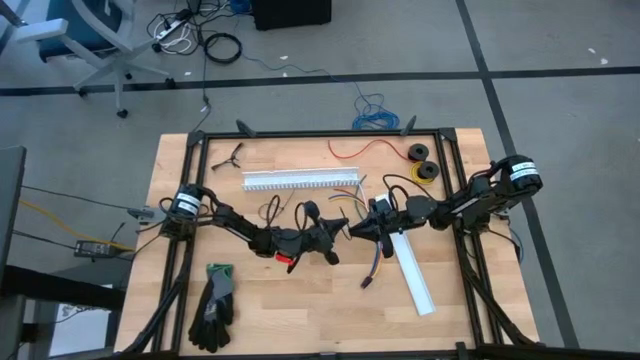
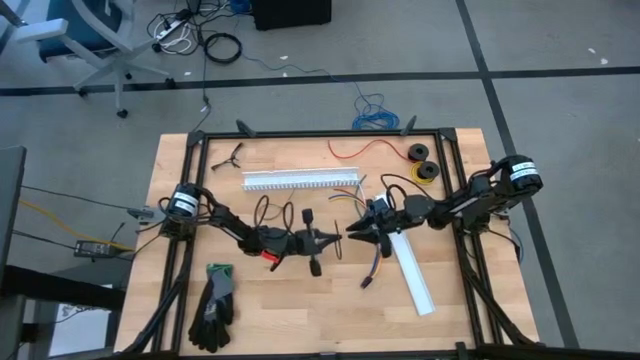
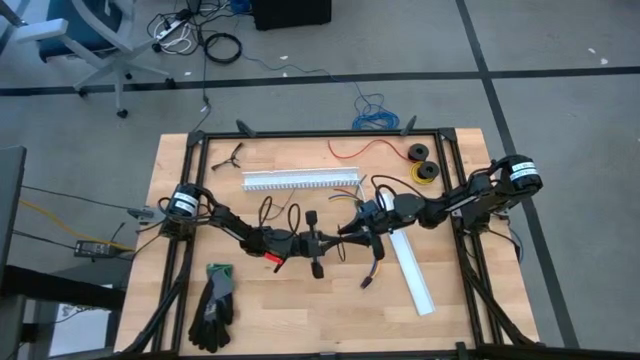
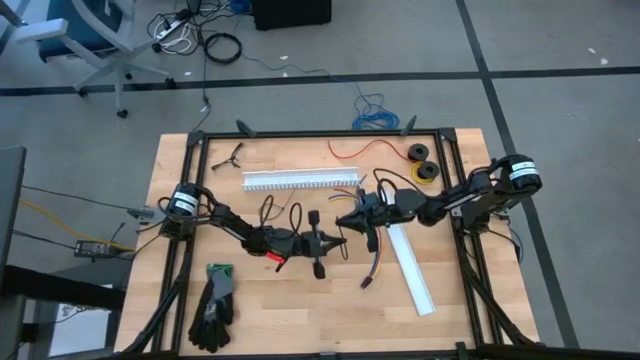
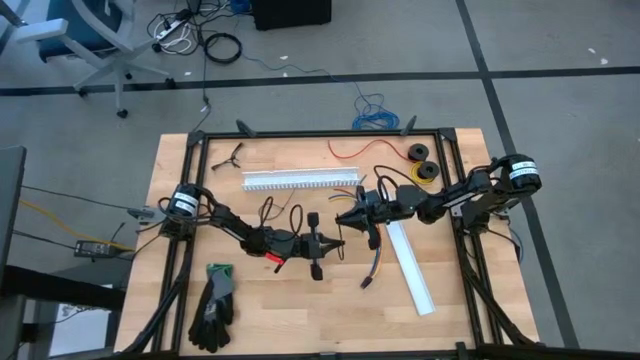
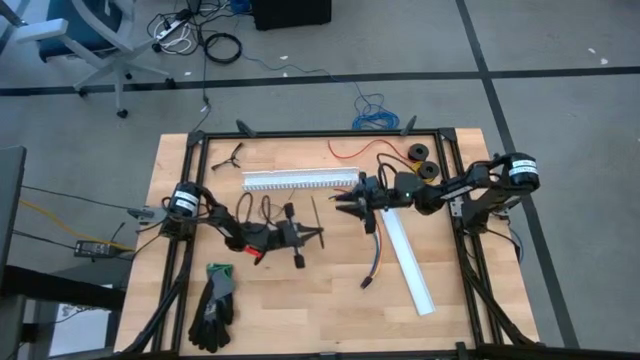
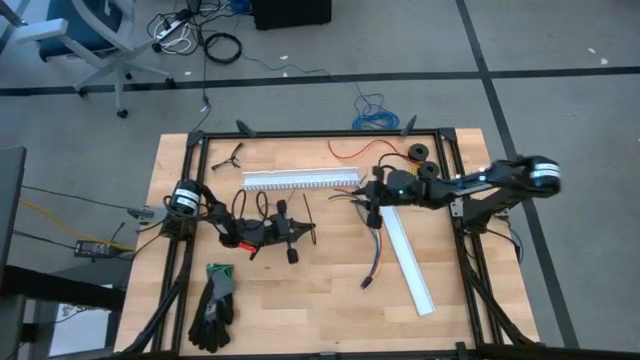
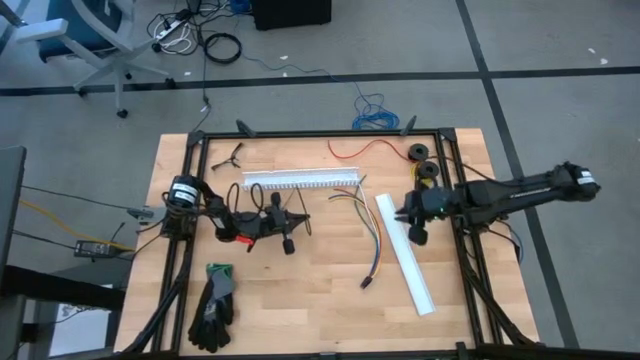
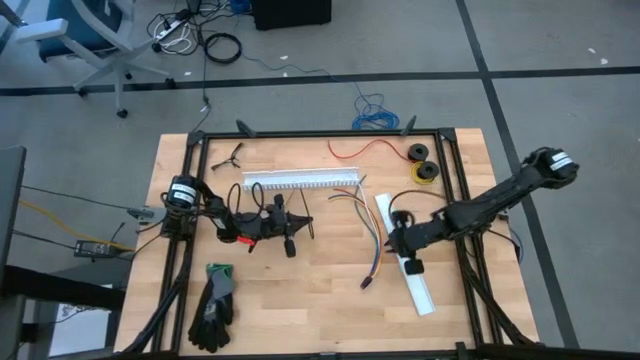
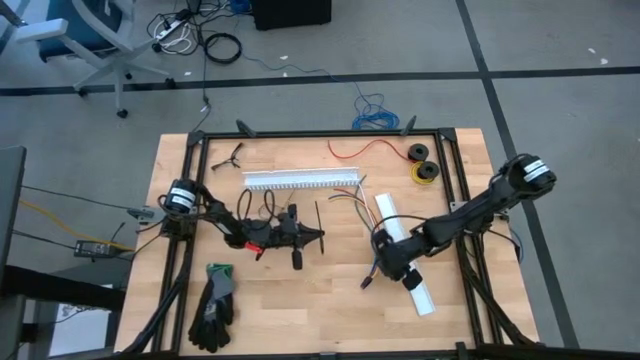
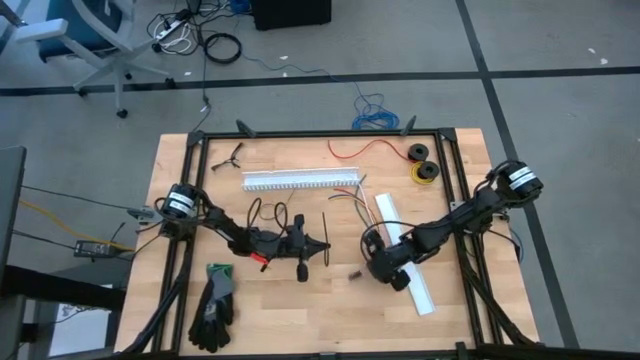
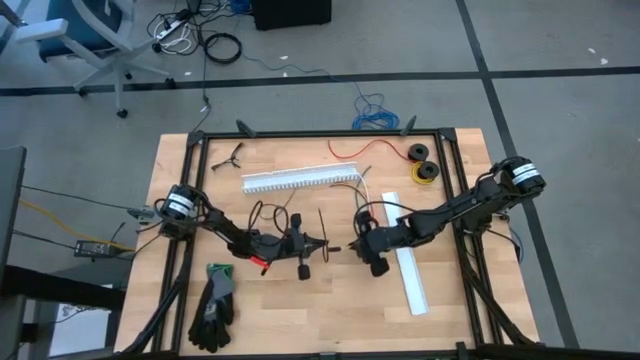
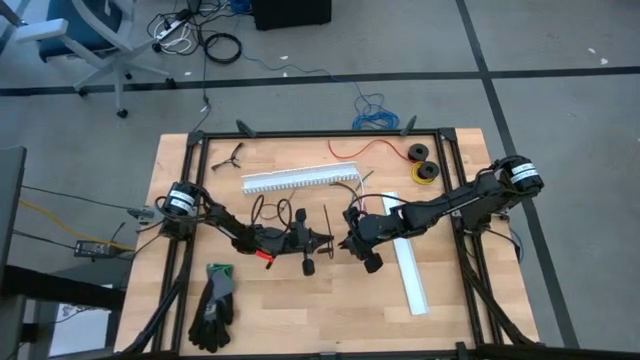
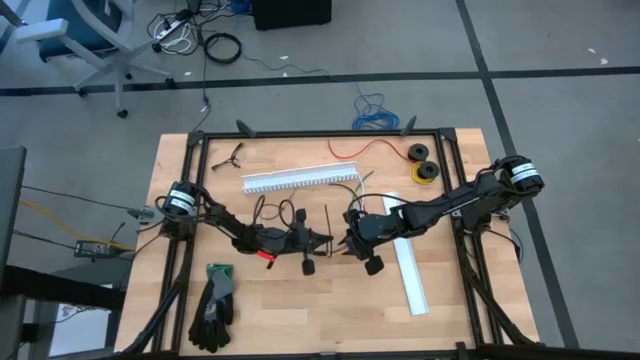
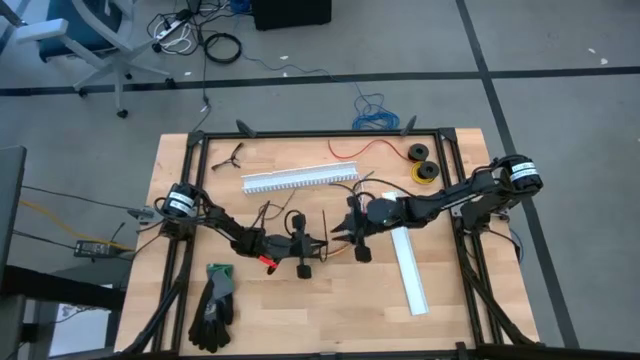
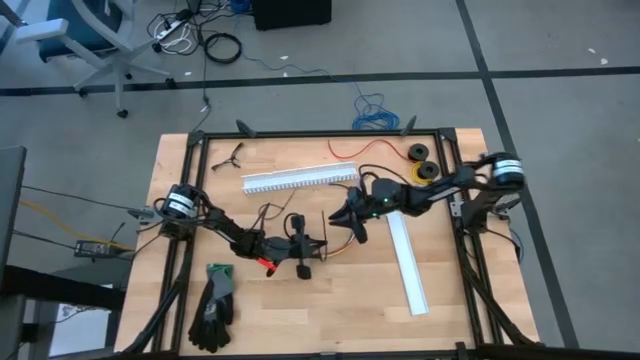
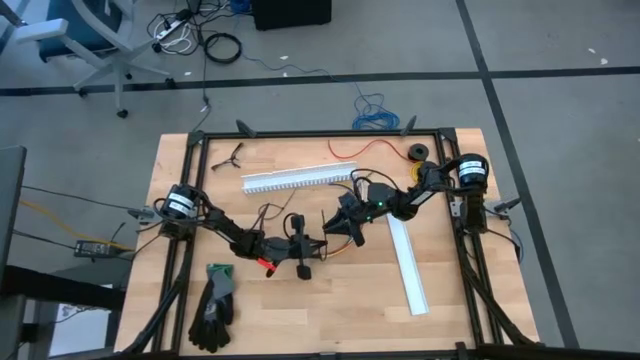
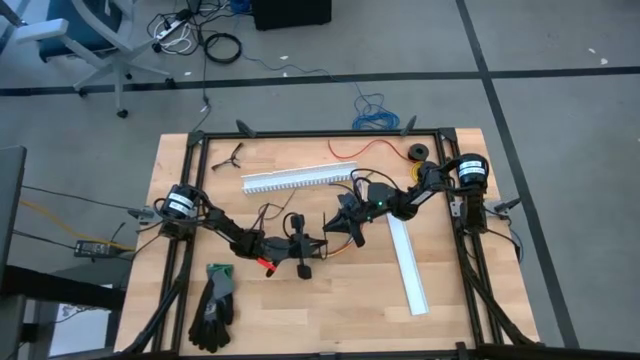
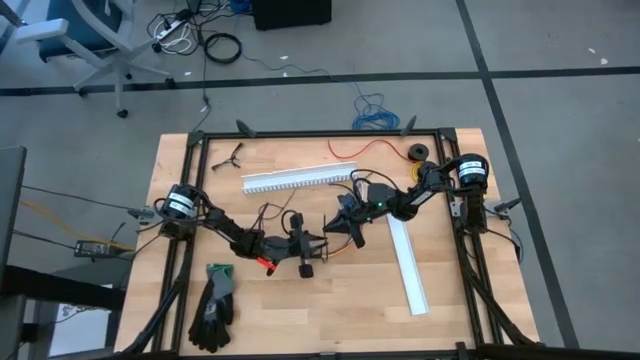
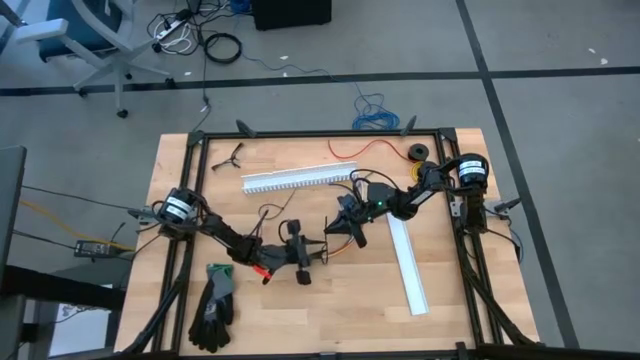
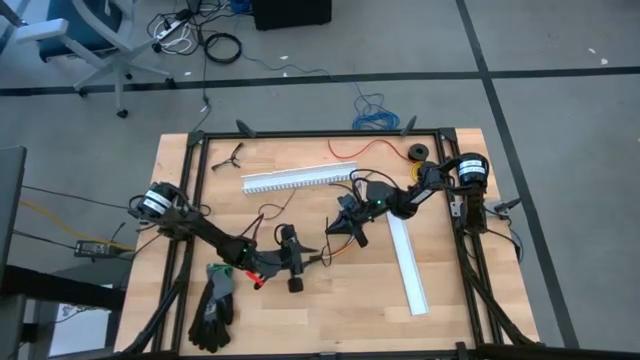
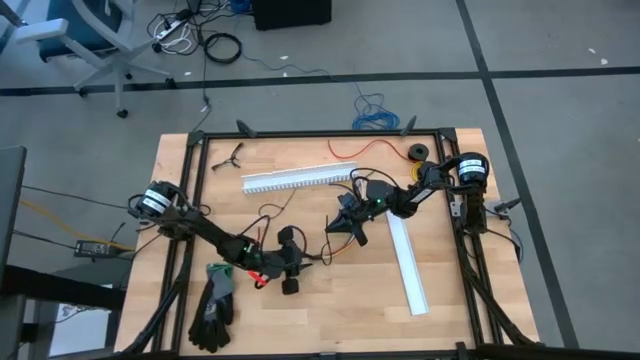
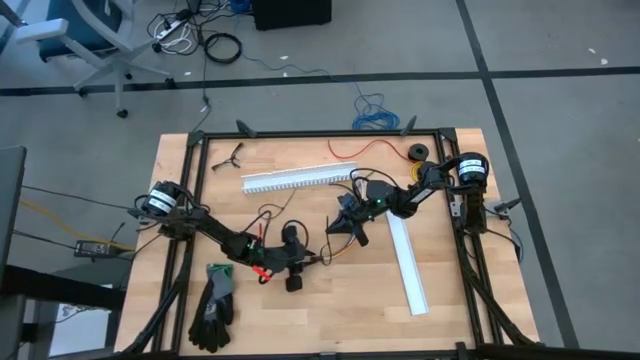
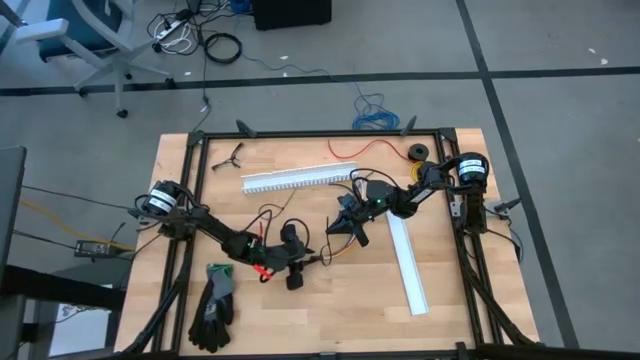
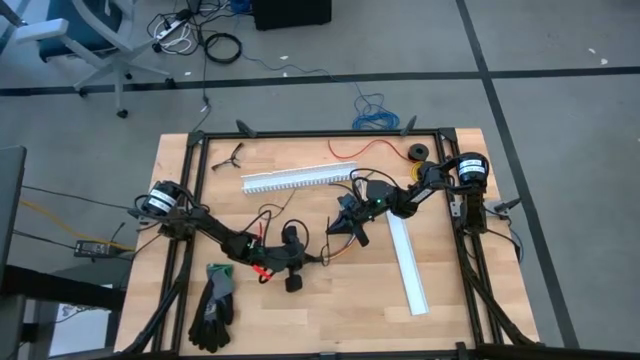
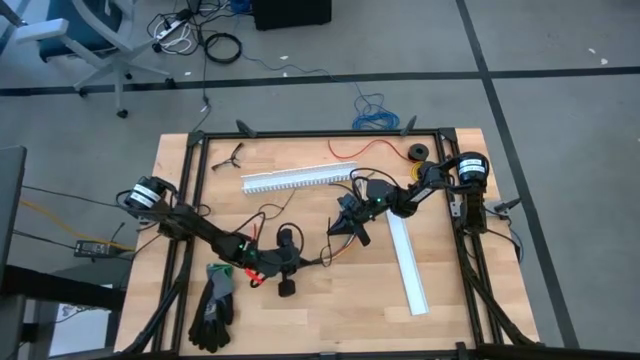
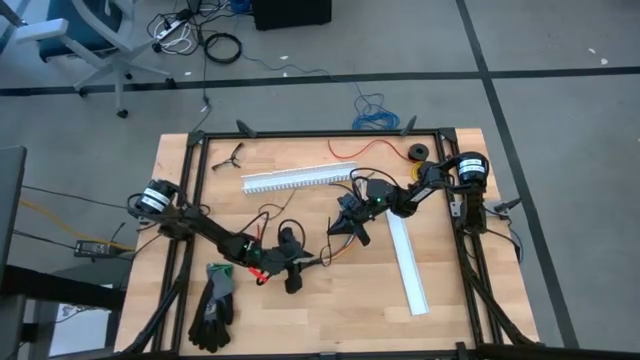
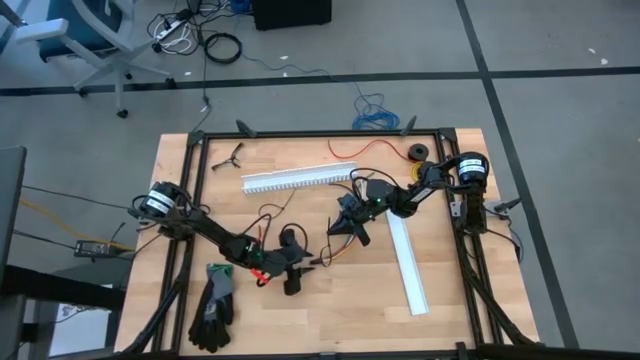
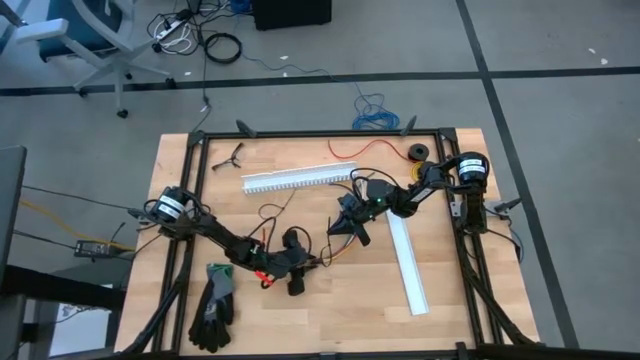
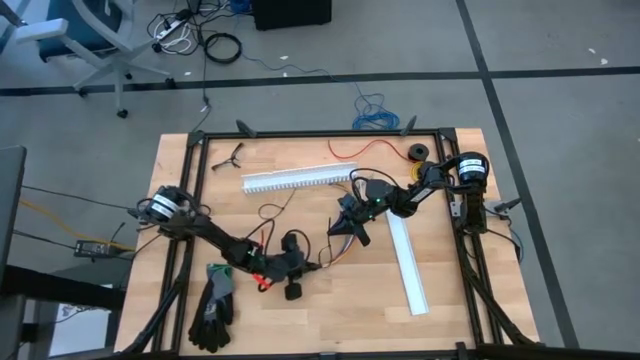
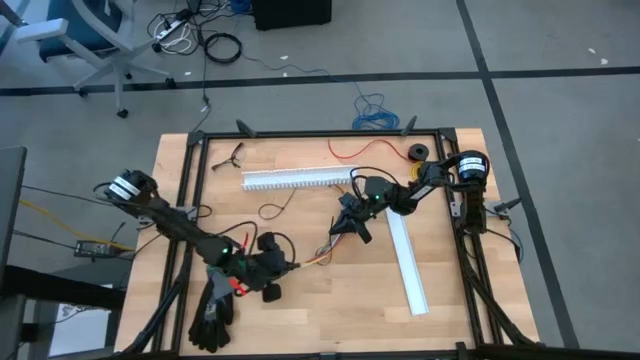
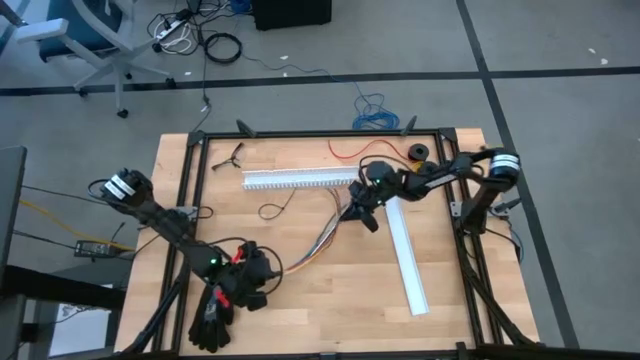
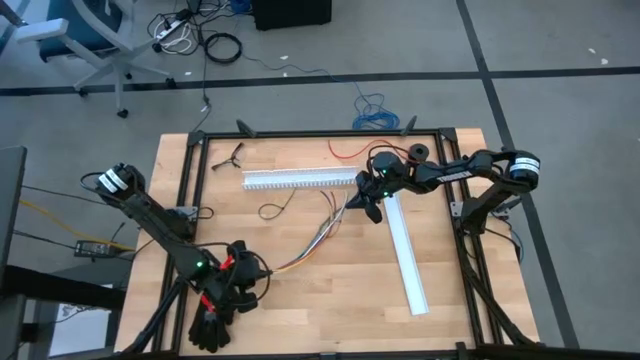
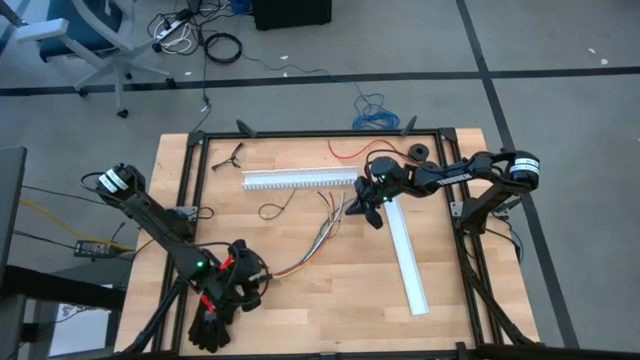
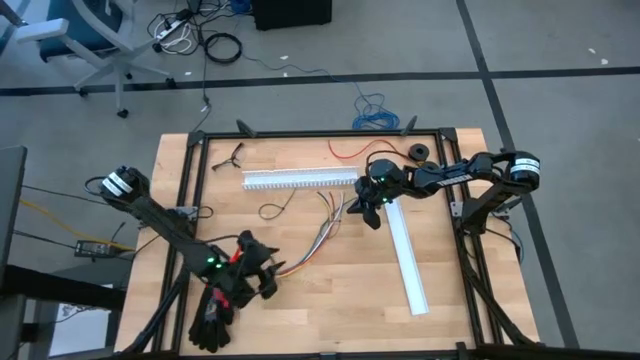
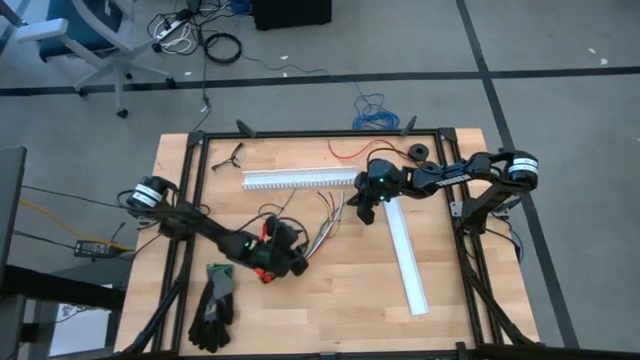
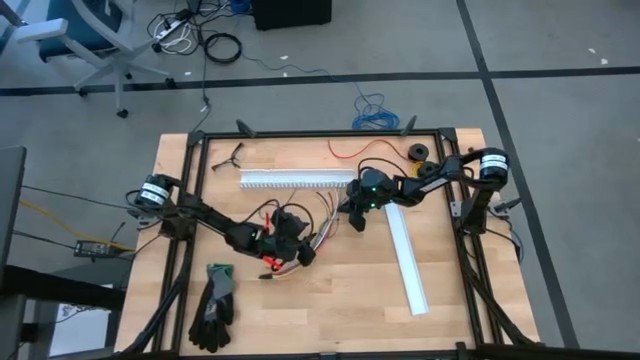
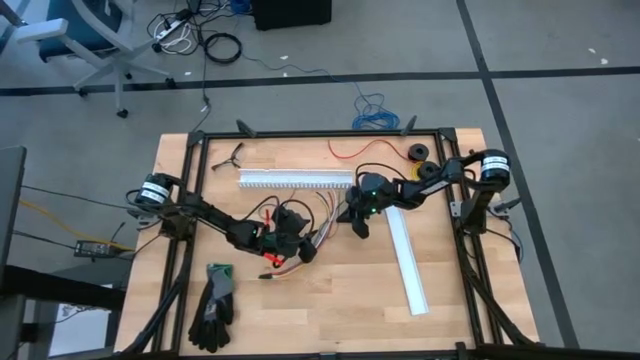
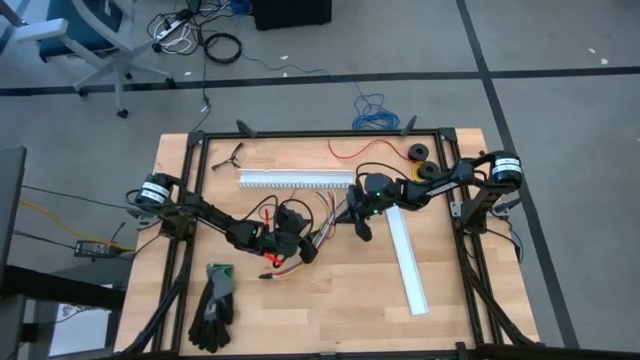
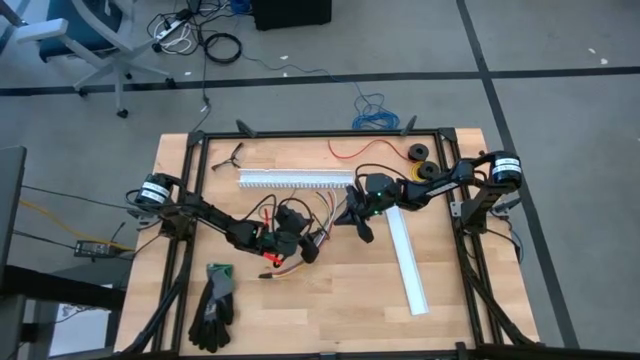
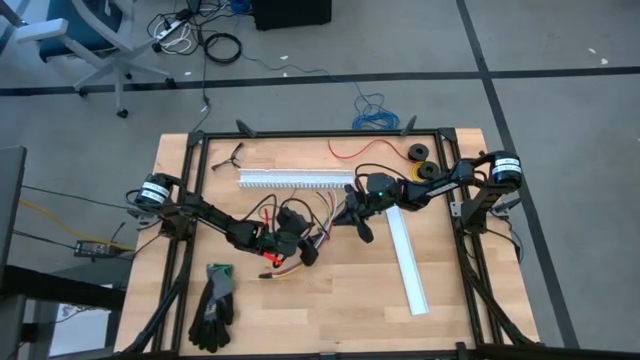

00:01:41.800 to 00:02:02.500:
Task: Ziptie cables
Wrap the cable wires with black zip tie

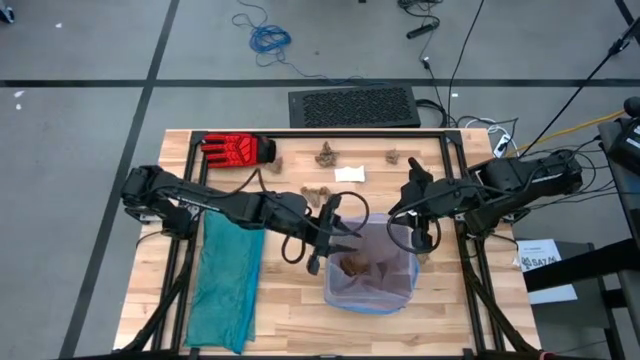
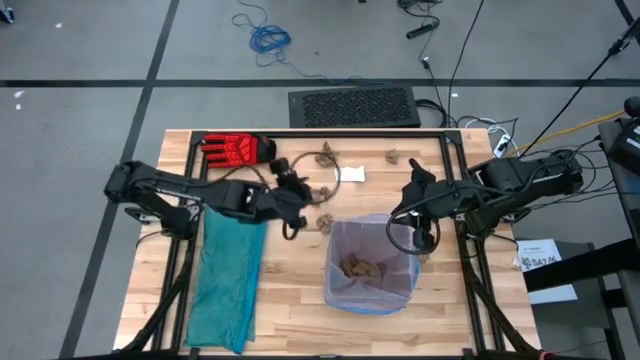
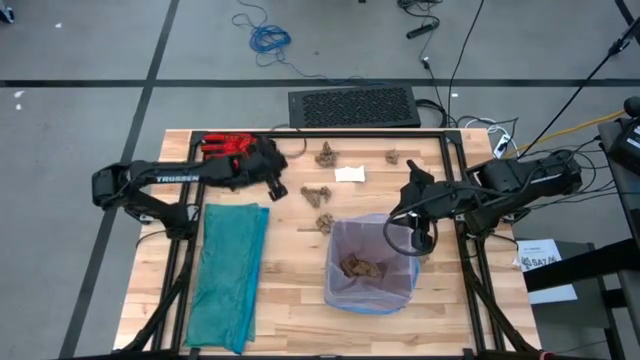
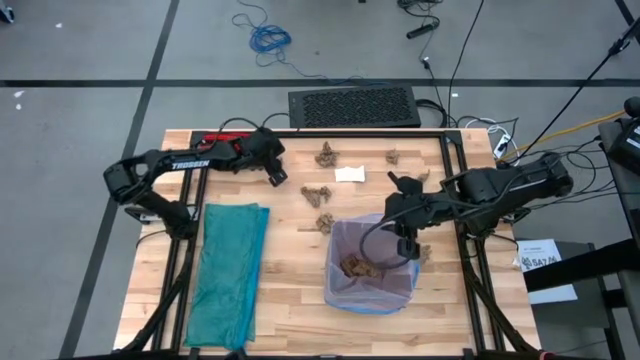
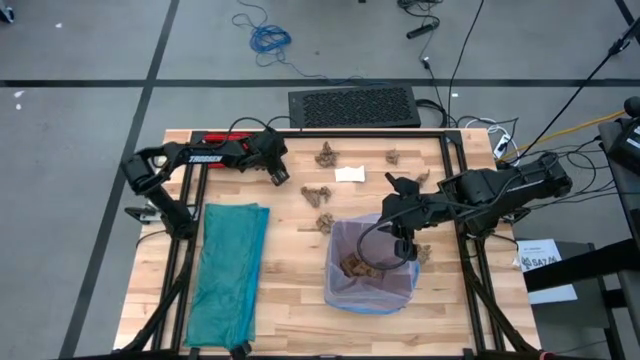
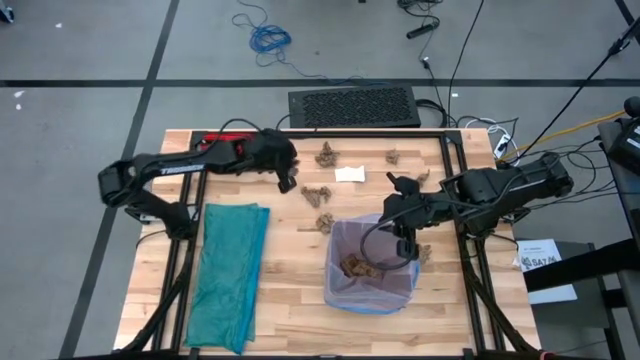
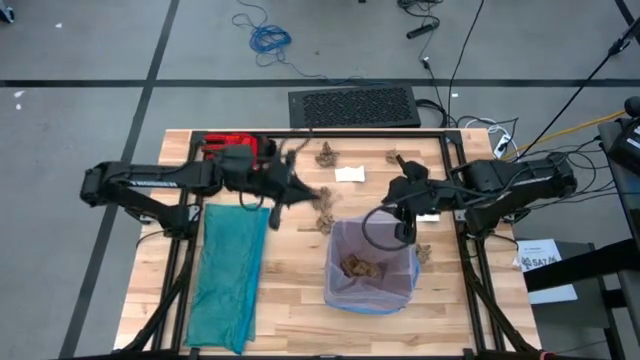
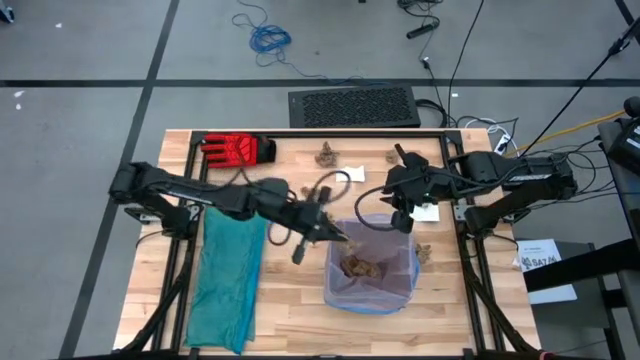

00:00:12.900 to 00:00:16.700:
Task: place trash/remove bag and relplace
Put the brown napkin into the black trash bin
